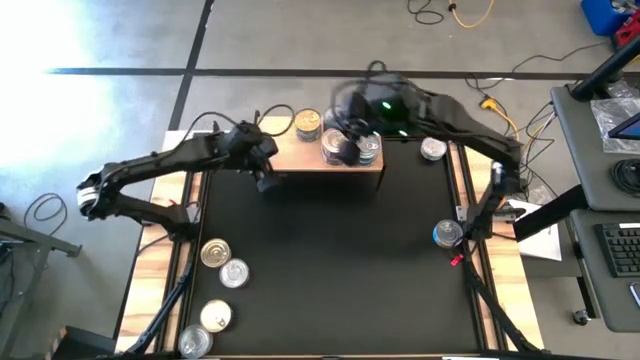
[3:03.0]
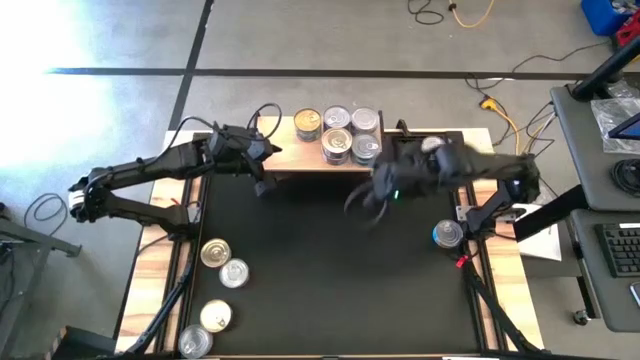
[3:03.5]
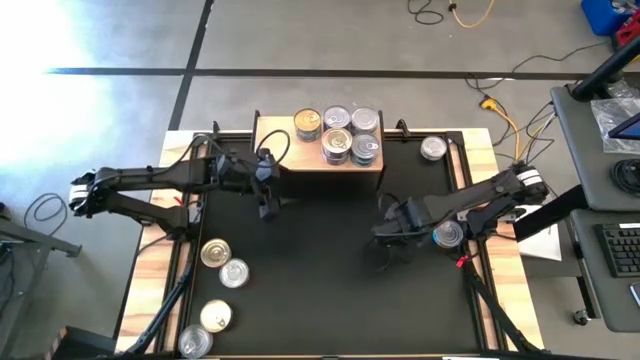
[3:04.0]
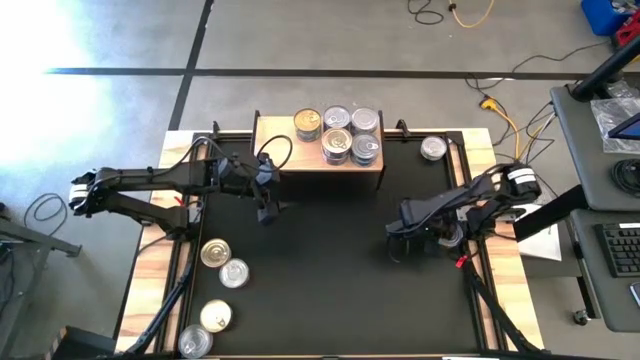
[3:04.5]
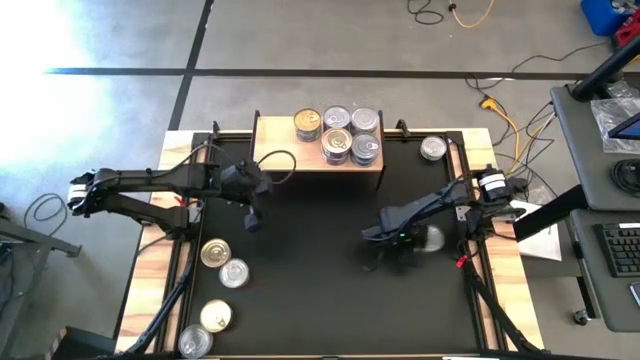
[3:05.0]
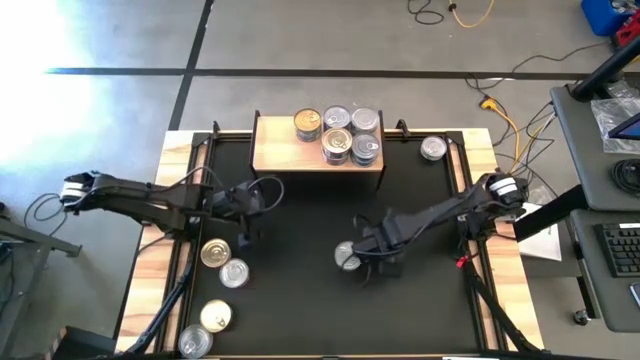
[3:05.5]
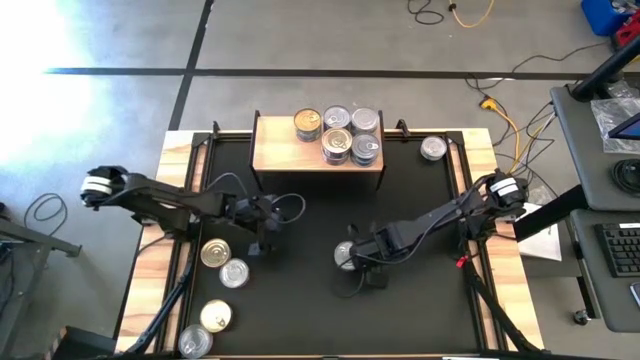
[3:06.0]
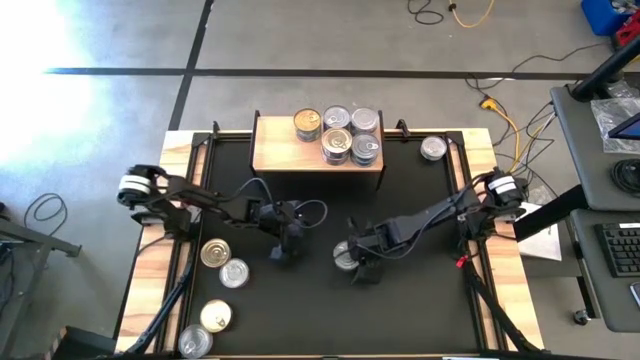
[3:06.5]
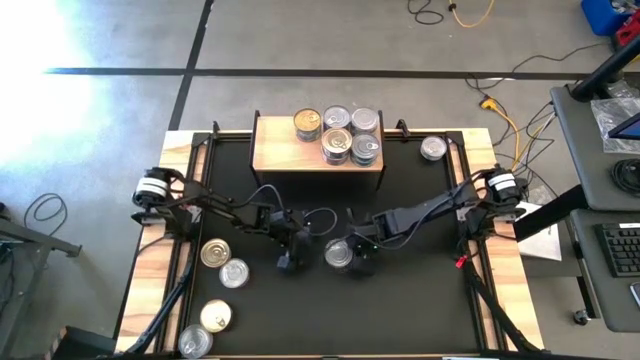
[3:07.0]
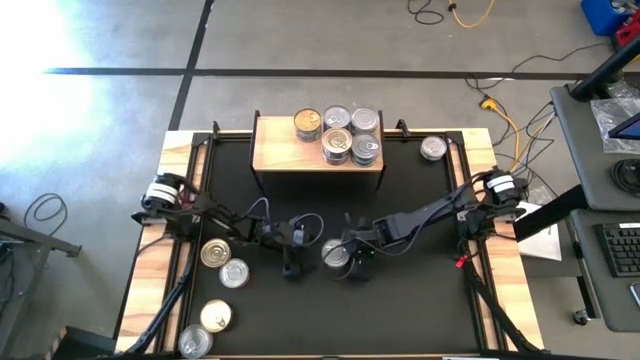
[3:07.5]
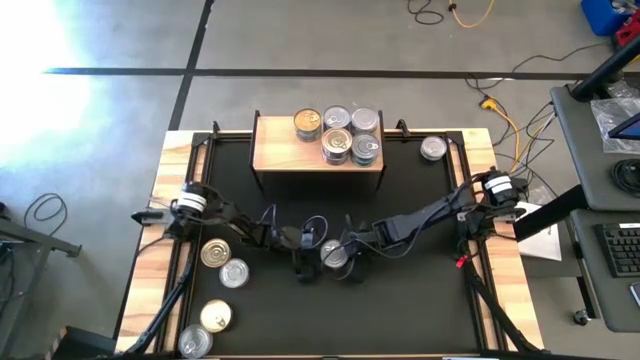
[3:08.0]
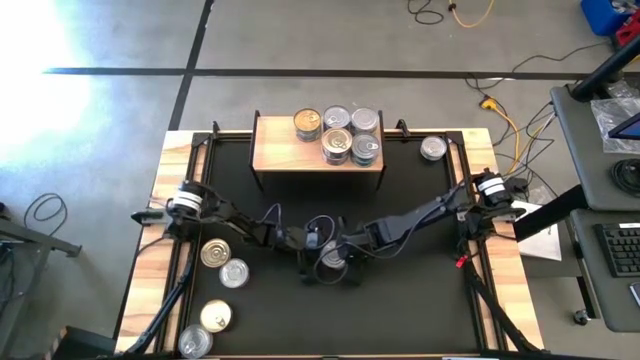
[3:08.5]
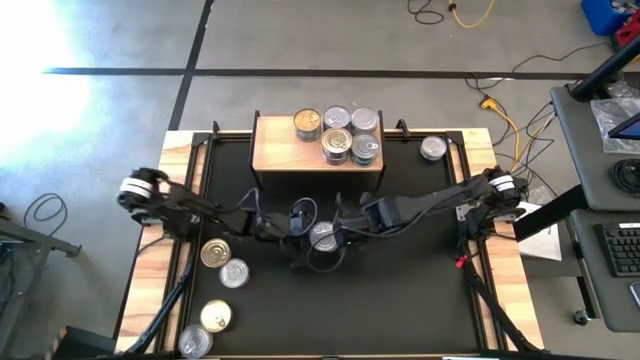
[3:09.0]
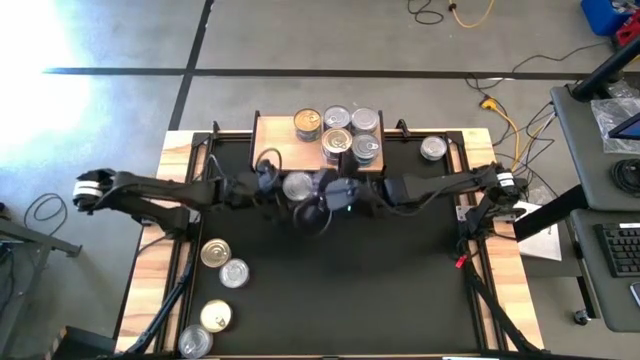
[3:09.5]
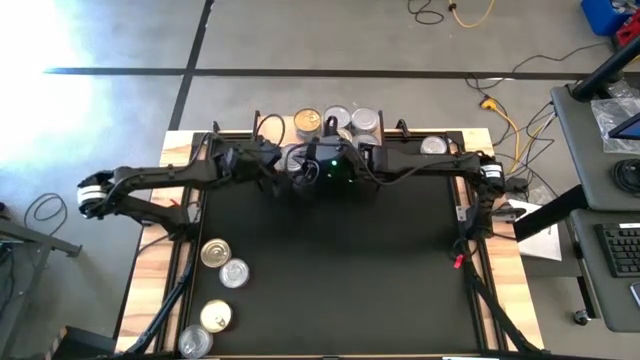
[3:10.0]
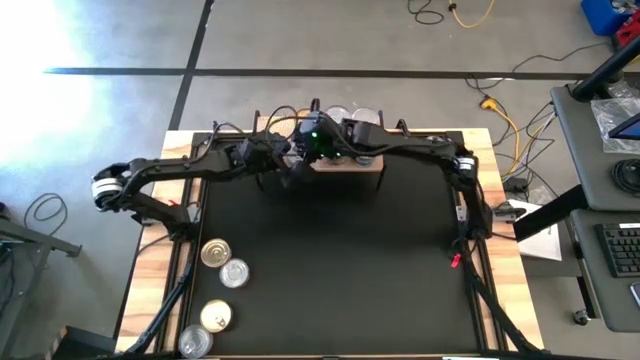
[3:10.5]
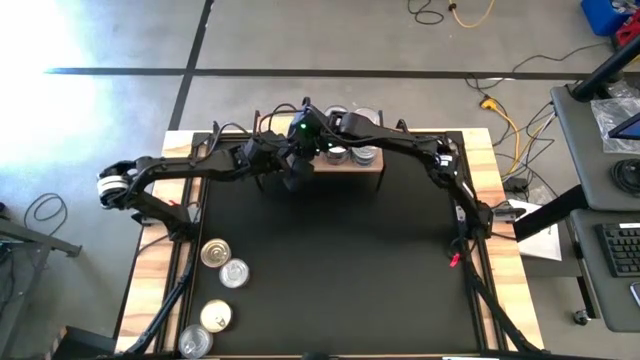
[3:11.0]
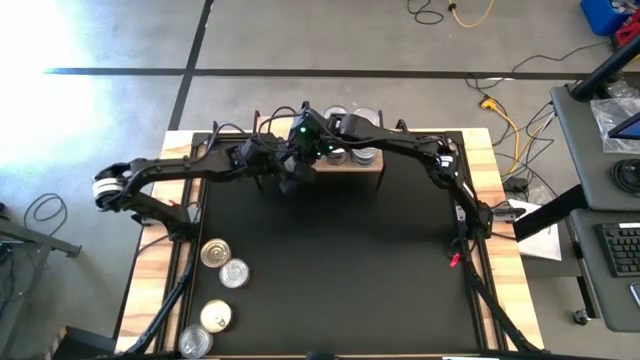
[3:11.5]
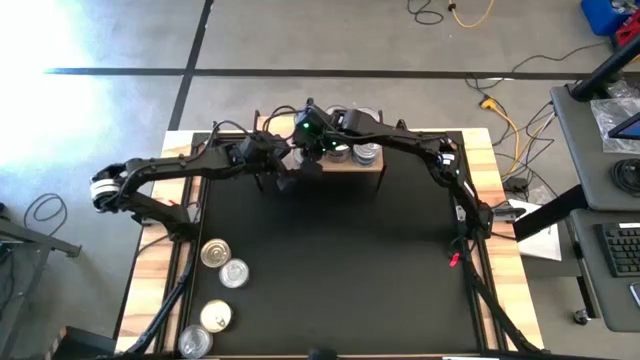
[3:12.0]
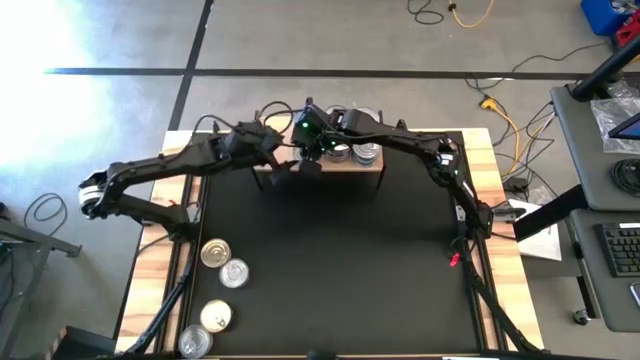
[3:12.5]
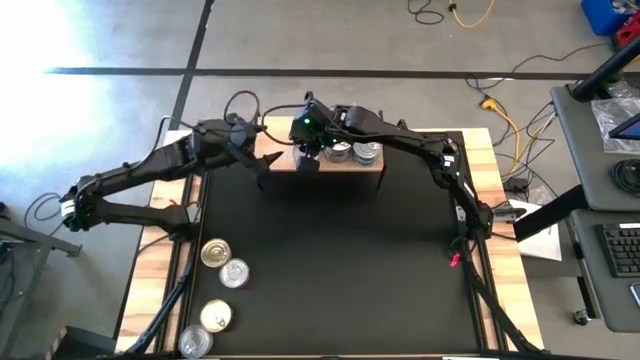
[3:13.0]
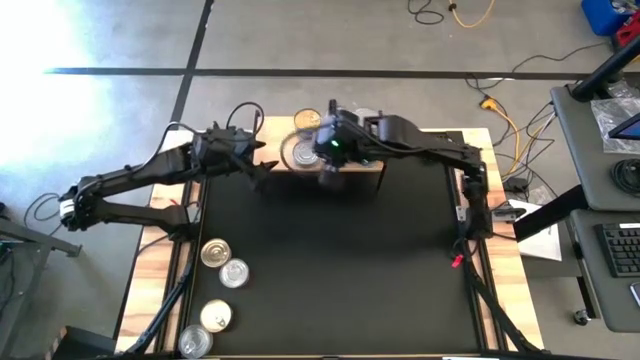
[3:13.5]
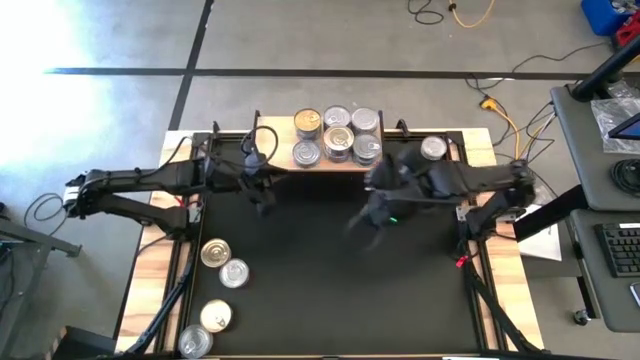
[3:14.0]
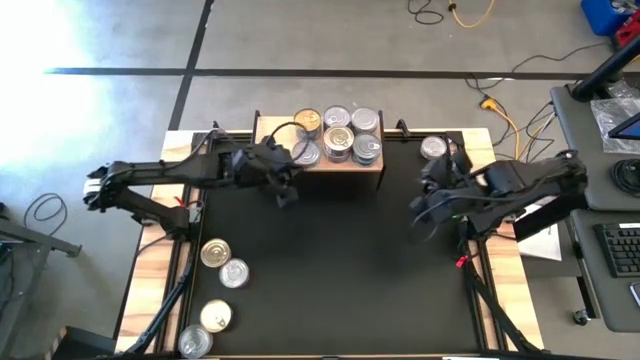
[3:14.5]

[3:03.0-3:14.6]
Task: Stack canned seafood by type on shelf
Put the bottom yellow tuna can on the shelf

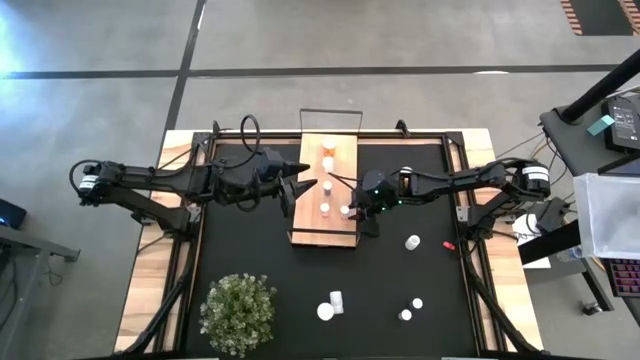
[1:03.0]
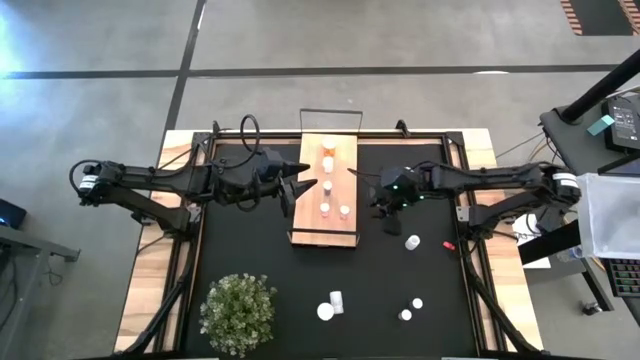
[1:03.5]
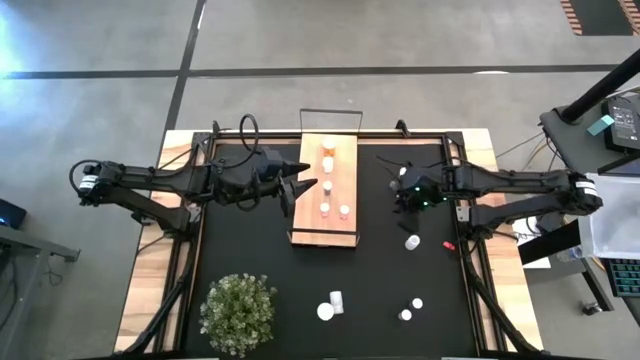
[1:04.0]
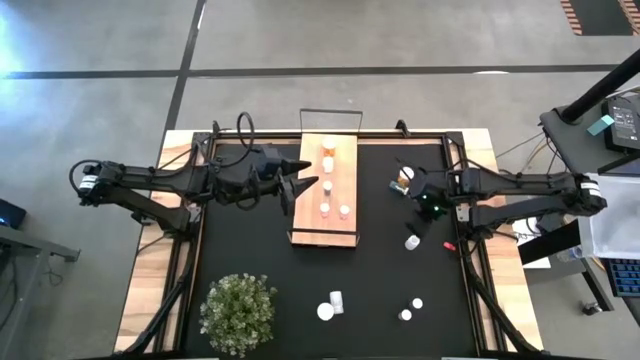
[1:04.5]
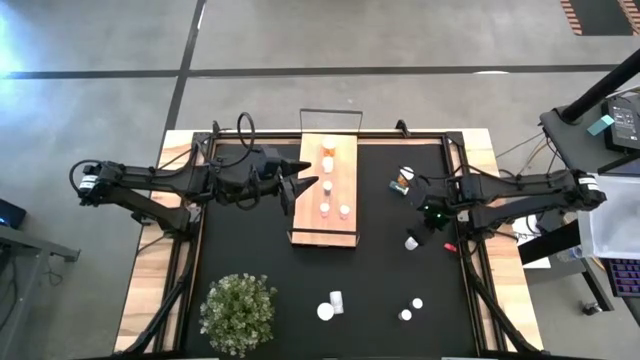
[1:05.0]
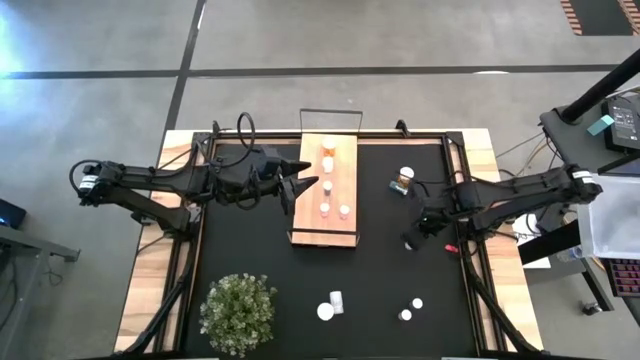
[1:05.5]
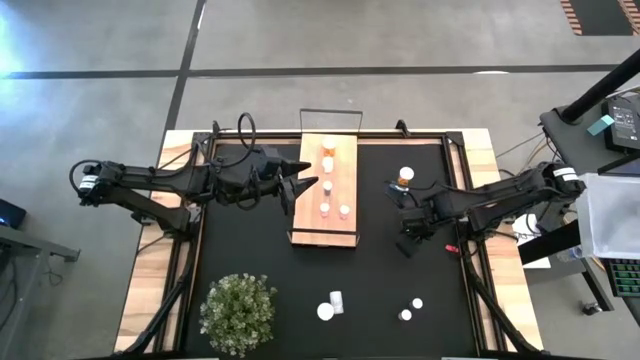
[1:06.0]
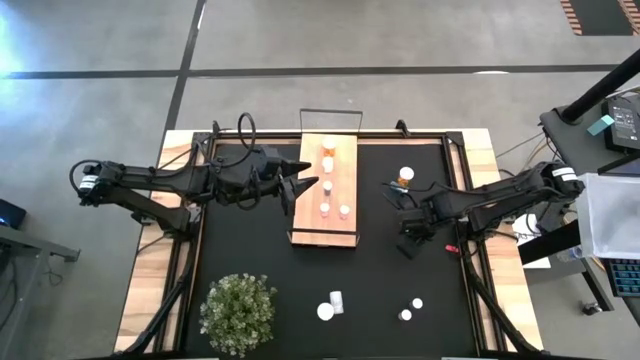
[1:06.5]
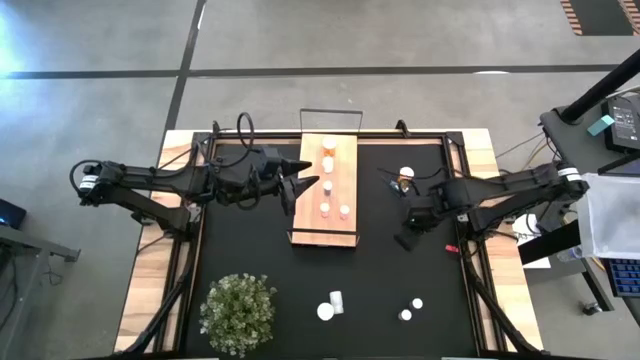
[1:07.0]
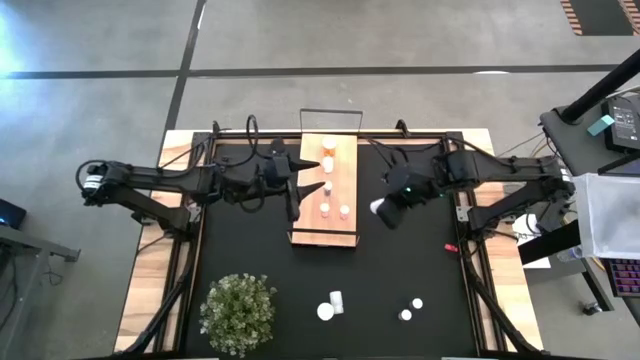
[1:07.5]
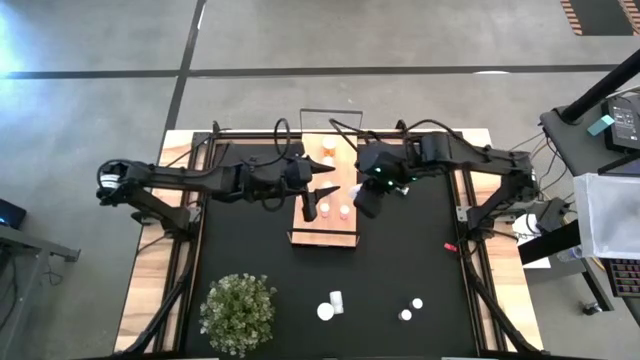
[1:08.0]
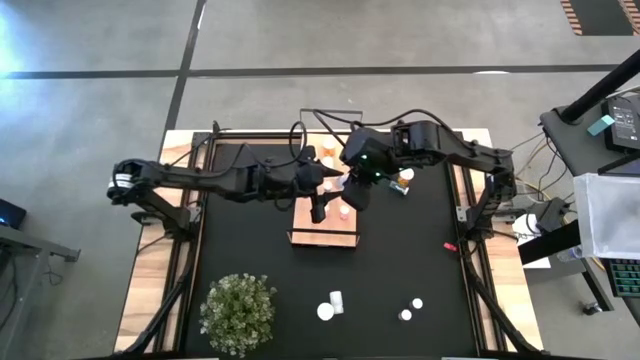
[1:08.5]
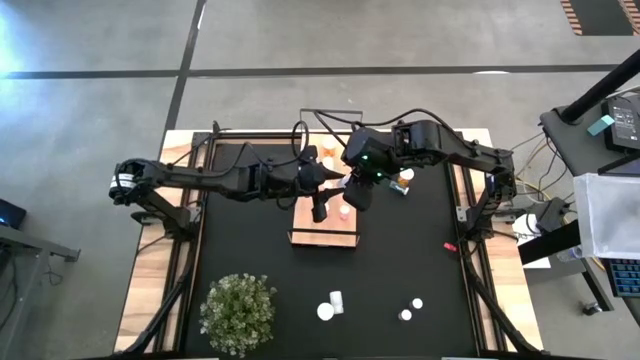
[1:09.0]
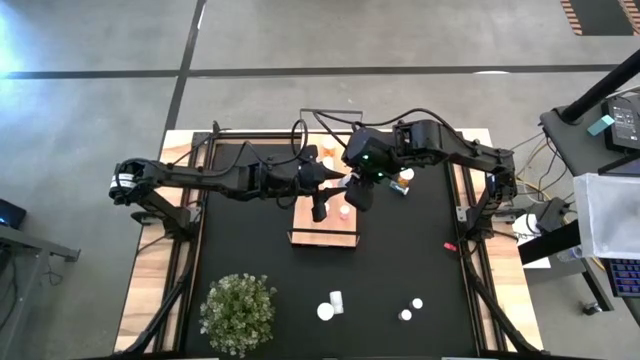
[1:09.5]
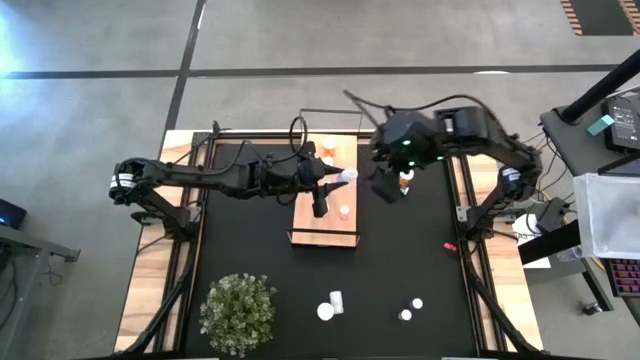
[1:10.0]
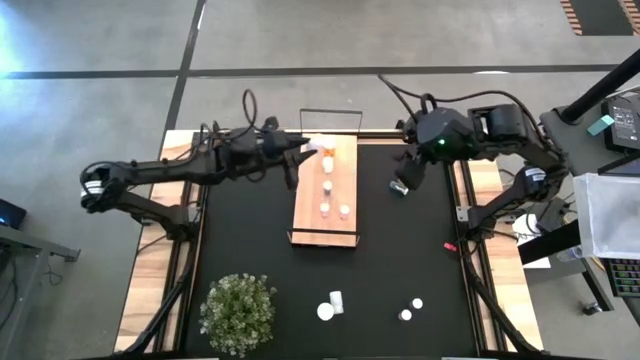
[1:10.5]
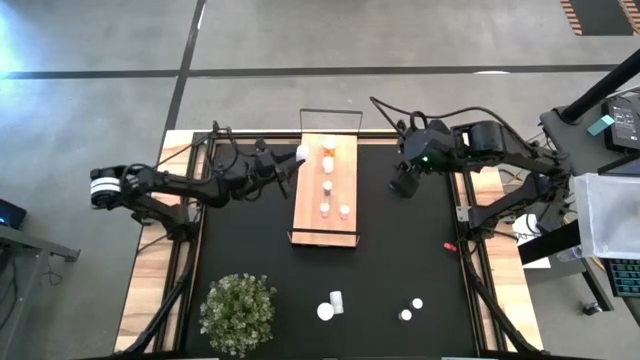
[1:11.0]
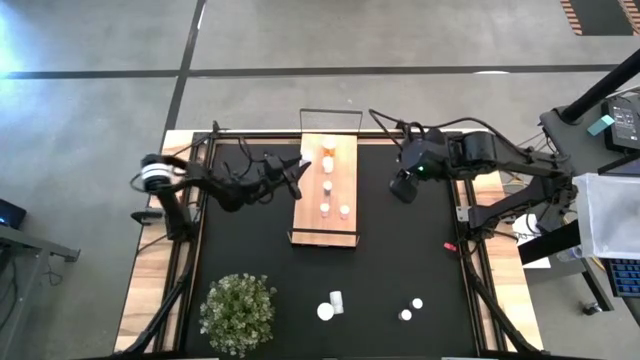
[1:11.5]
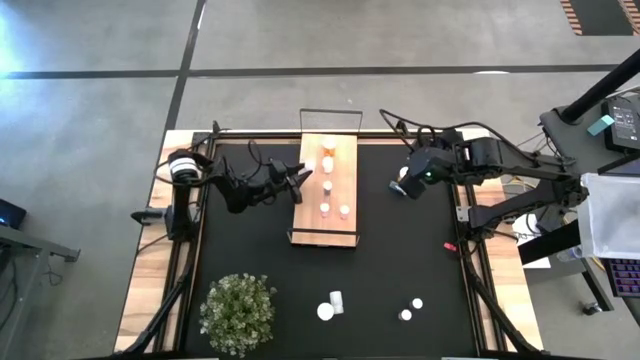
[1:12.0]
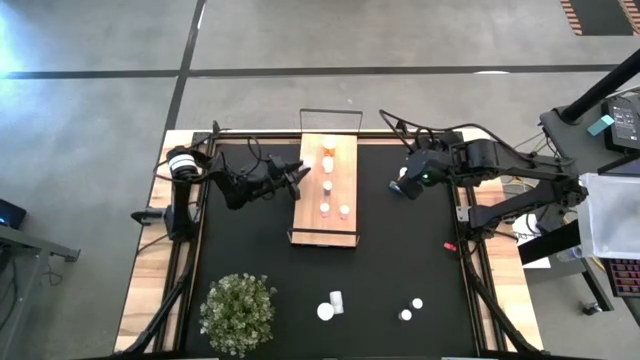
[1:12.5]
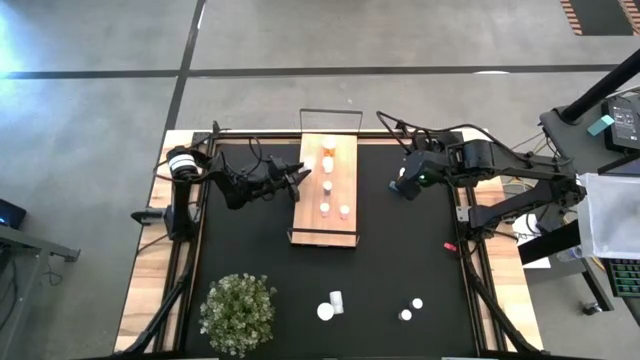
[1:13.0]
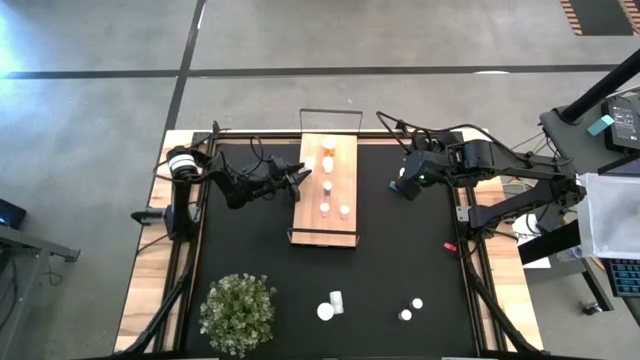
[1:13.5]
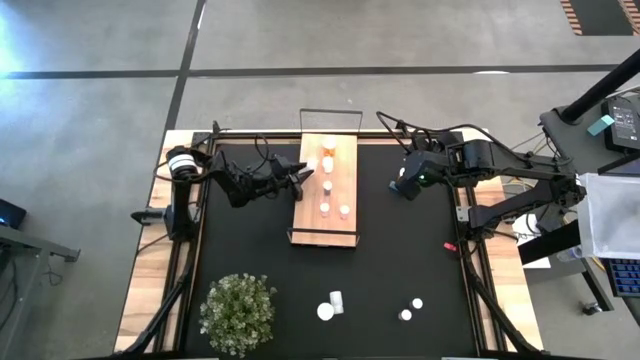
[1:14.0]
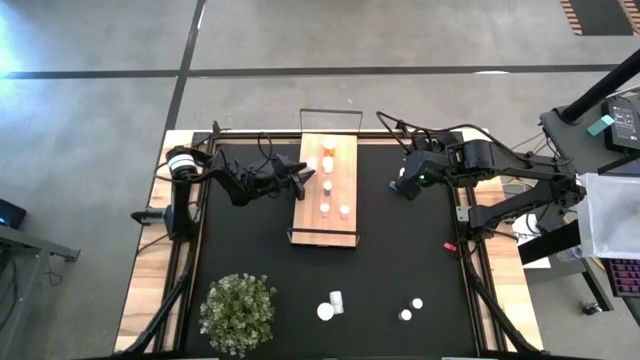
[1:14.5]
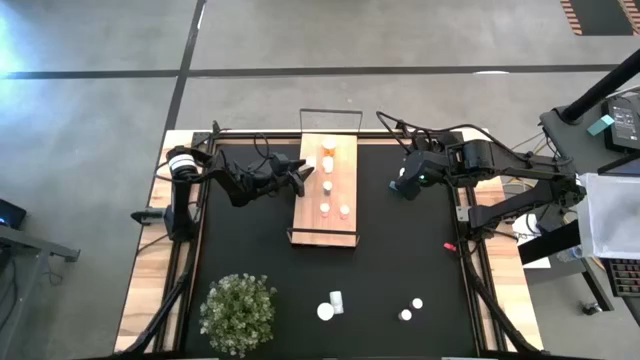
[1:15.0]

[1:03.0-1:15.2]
Task: Pick and place medicine bottles onto shelf by color
Put the top white pill bottle on the shelf aligned with the other white pill bottle
